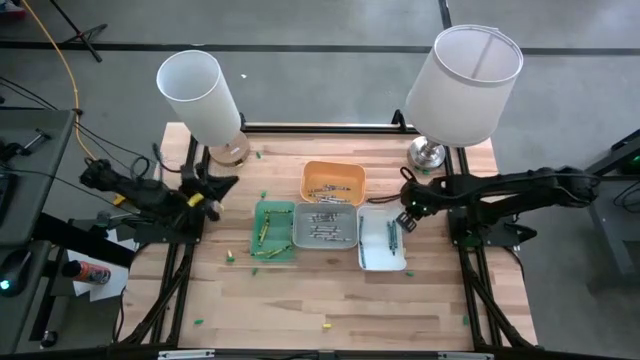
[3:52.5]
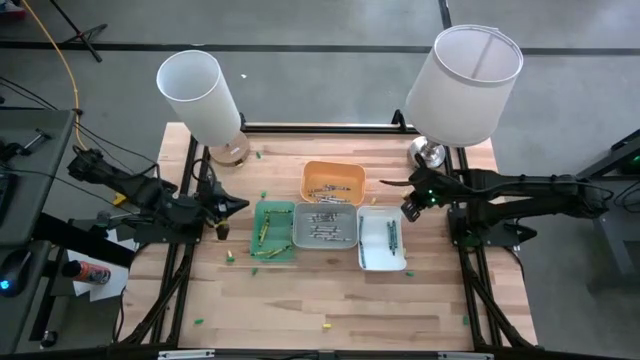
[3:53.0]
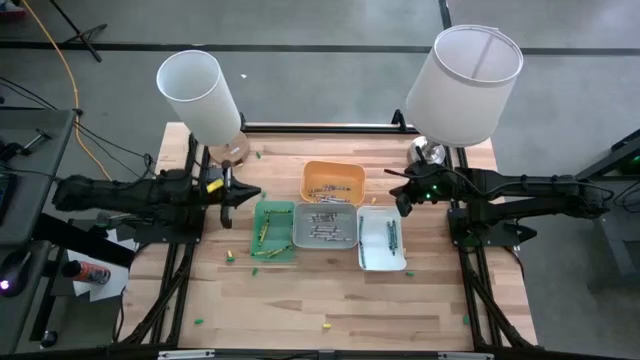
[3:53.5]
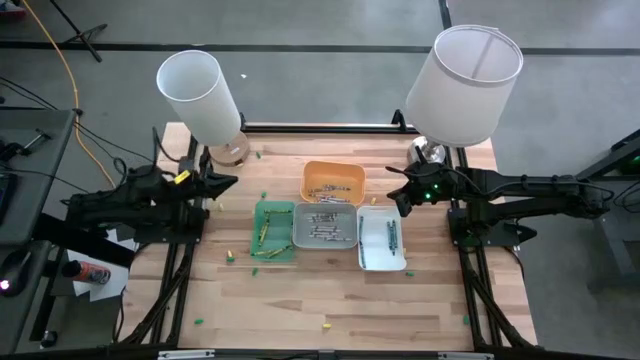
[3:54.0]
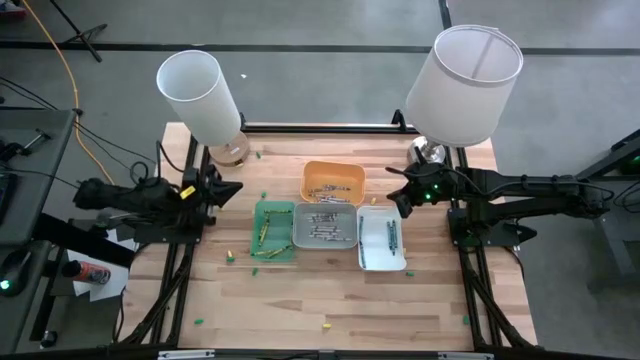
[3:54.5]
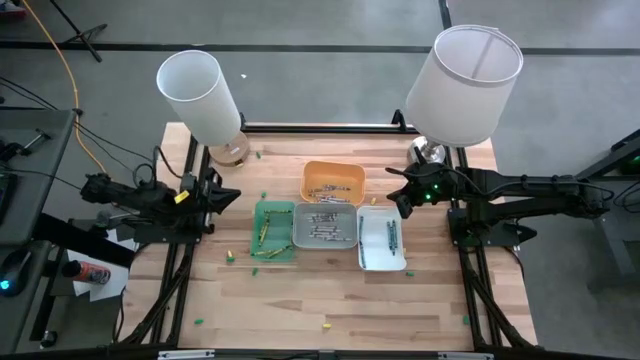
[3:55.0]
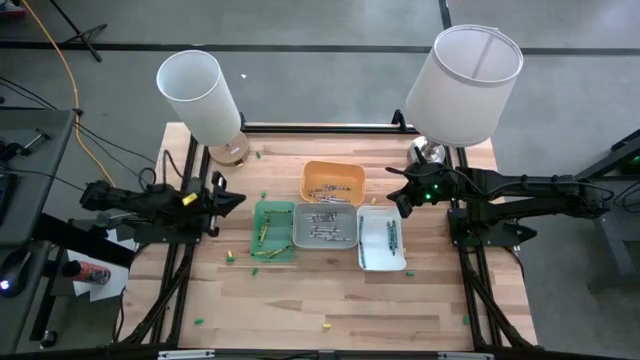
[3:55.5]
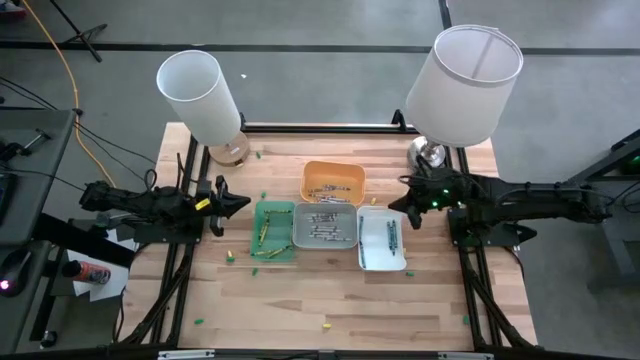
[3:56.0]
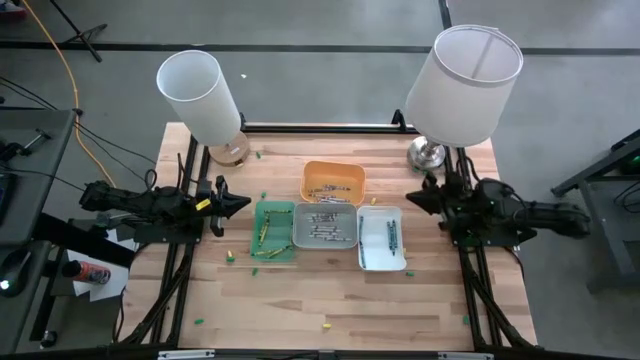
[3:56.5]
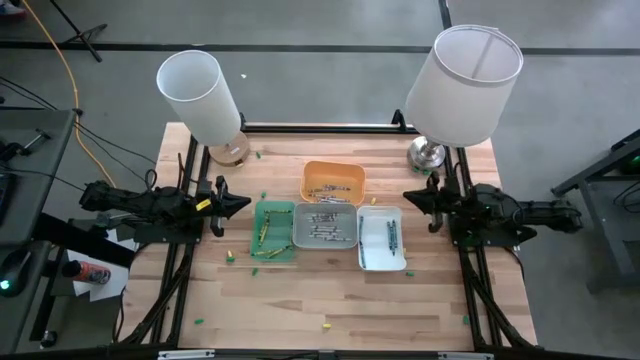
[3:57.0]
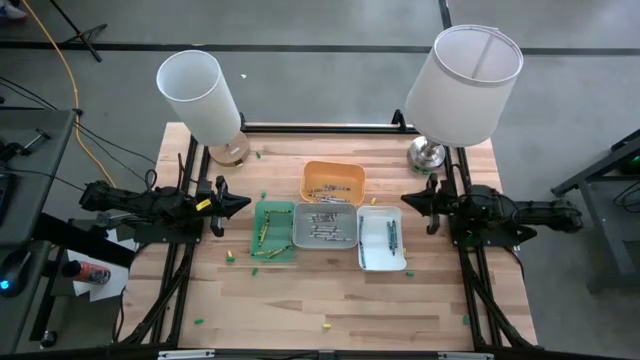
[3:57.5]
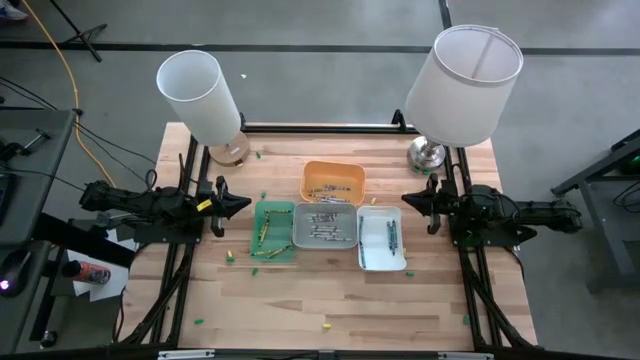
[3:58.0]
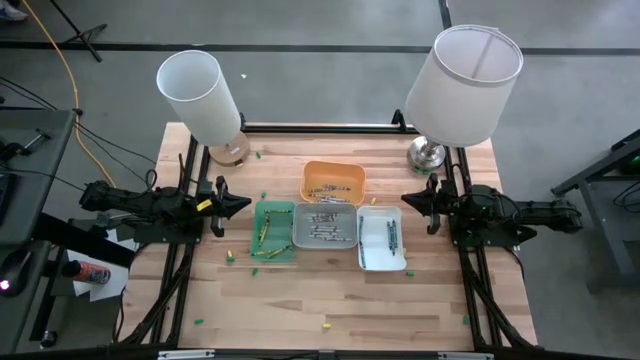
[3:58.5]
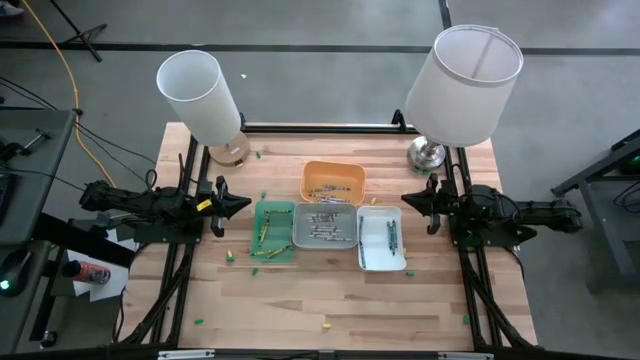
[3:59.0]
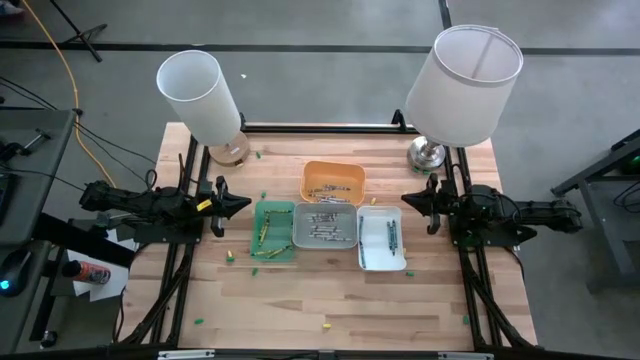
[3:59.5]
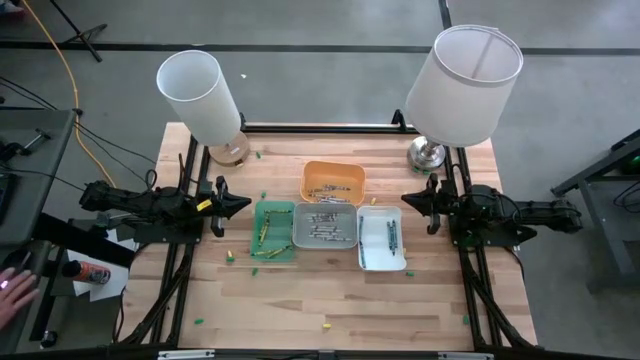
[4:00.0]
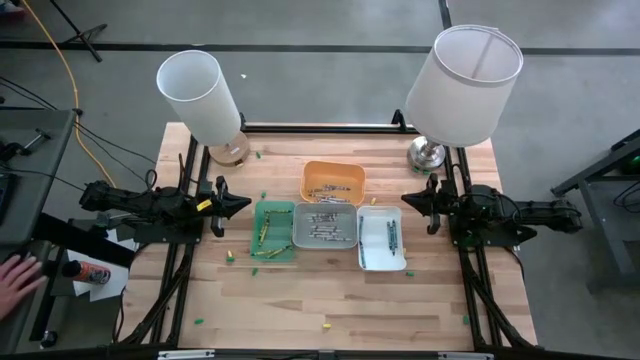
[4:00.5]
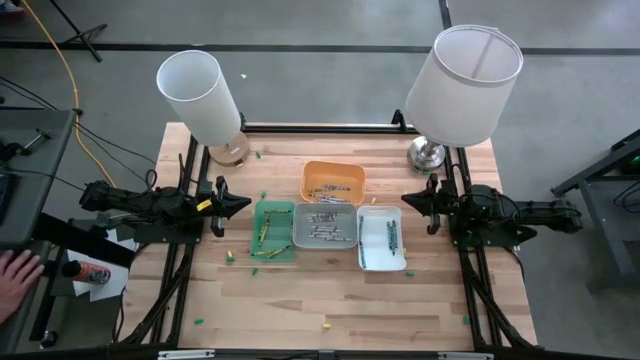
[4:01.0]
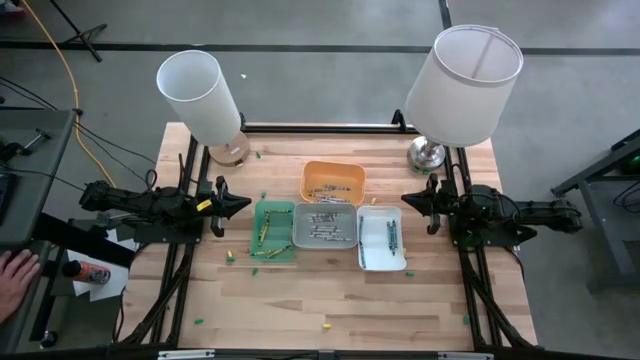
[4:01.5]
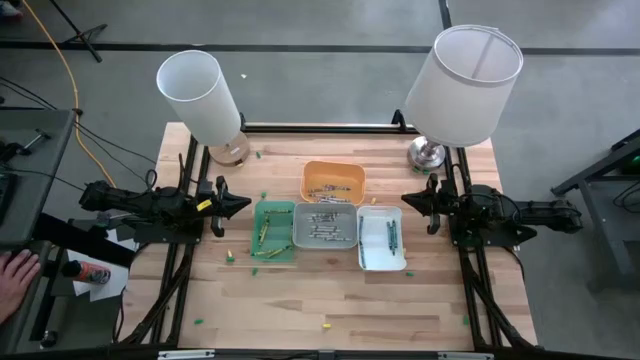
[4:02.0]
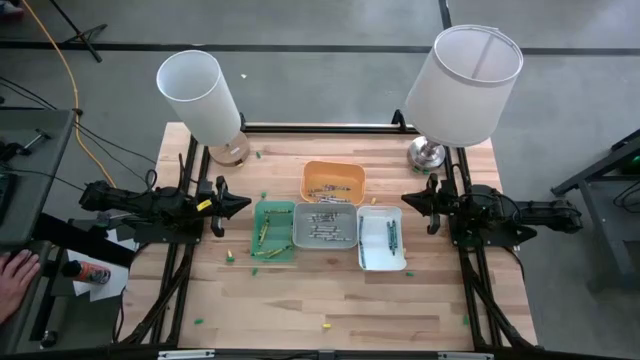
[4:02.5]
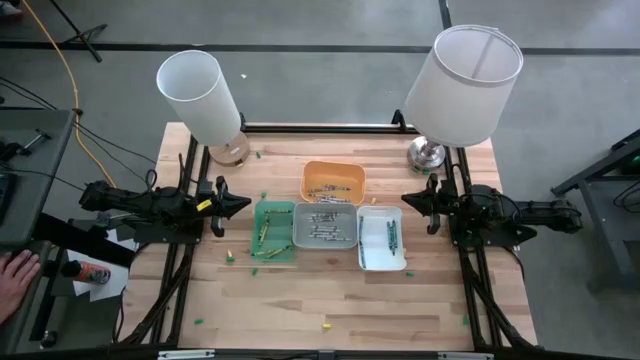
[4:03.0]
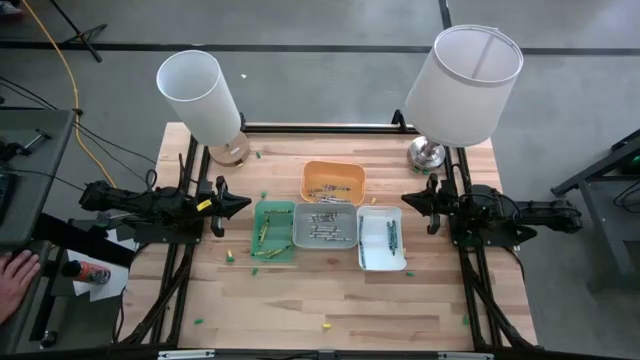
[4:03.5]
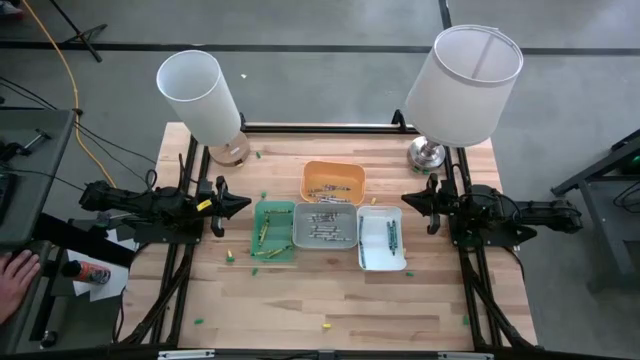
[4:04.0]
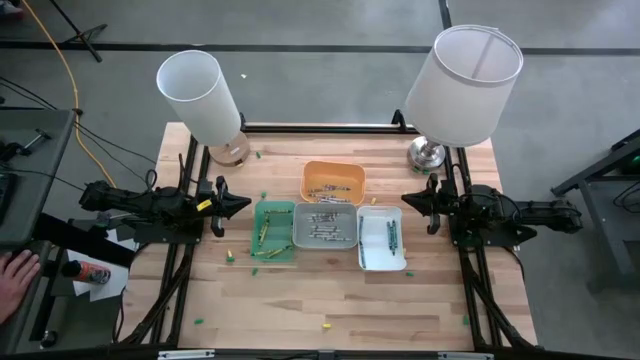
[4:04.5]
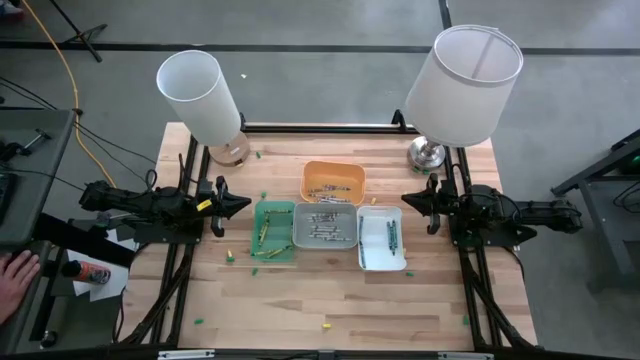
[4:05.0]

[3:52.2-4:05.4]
Task: Sort crayons
Return to Home Position

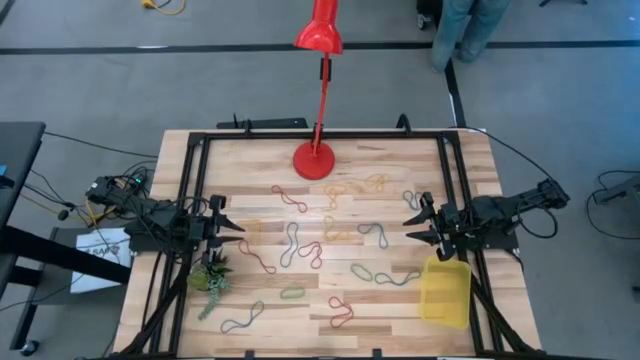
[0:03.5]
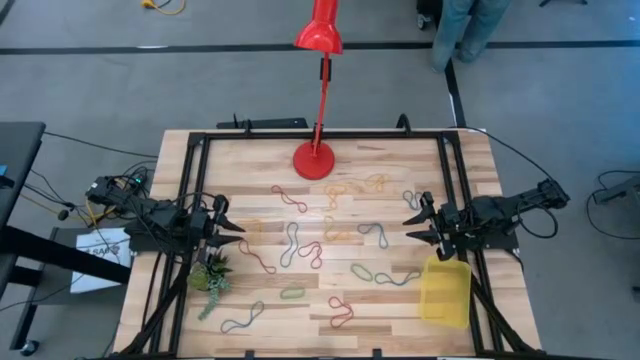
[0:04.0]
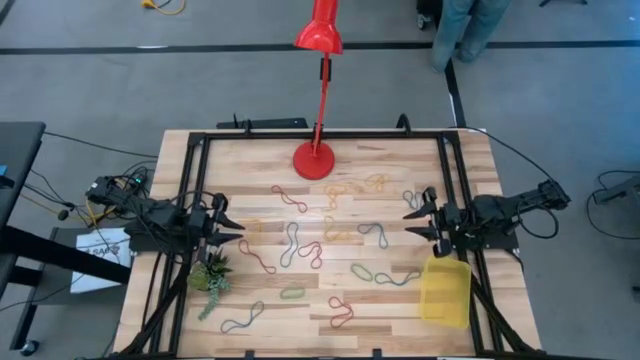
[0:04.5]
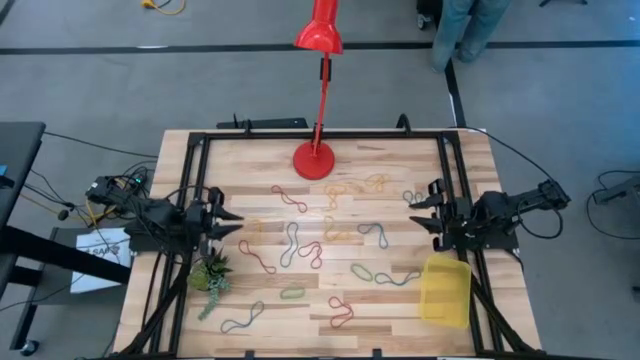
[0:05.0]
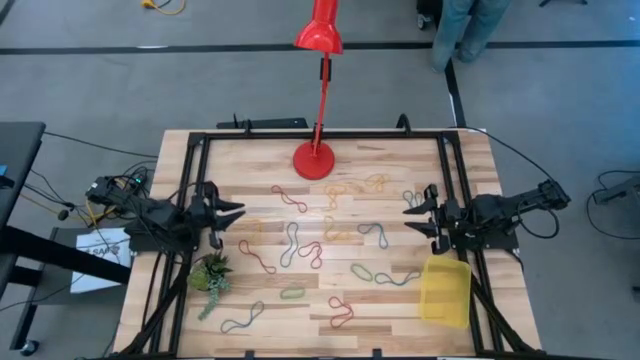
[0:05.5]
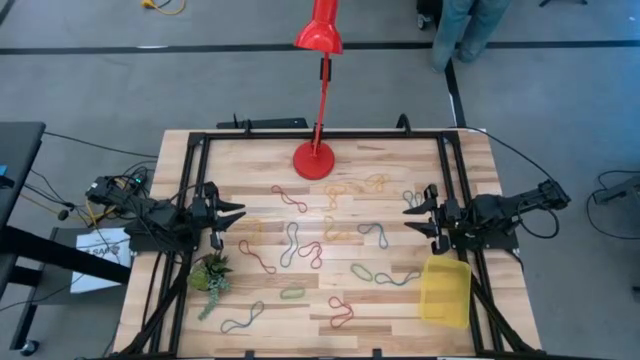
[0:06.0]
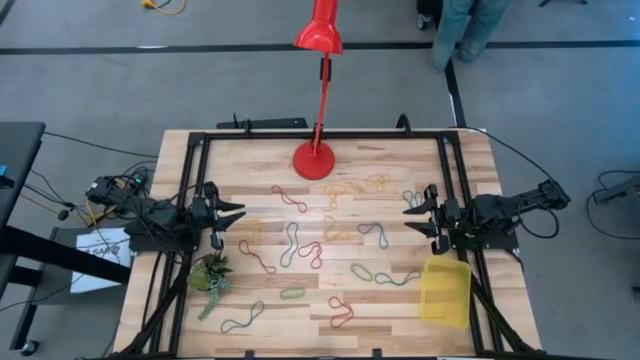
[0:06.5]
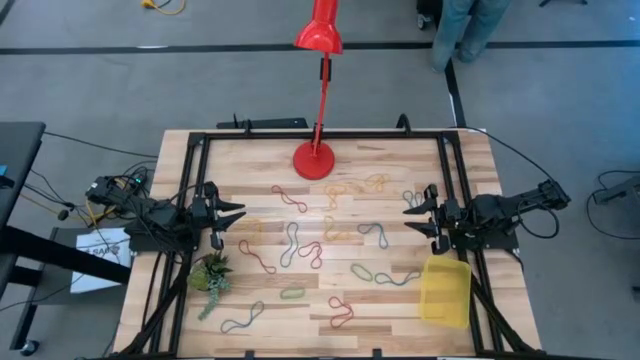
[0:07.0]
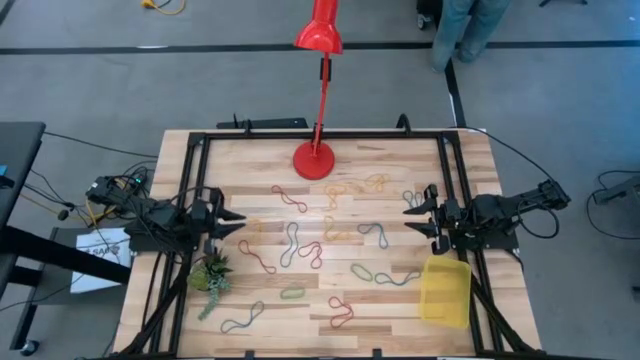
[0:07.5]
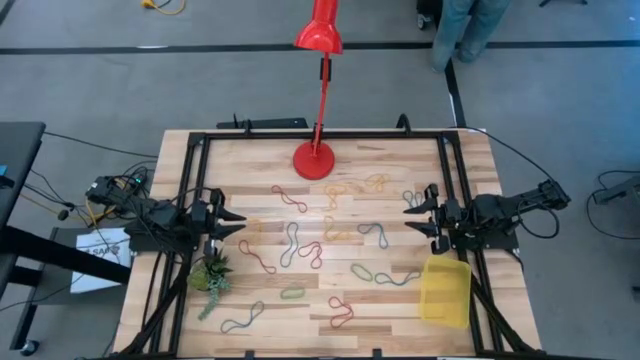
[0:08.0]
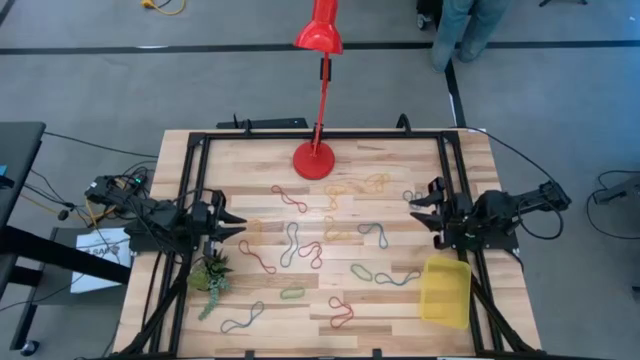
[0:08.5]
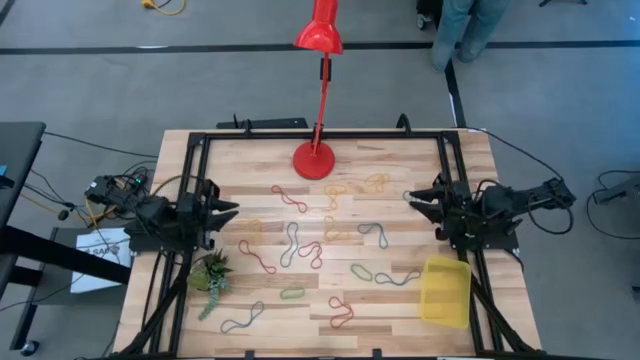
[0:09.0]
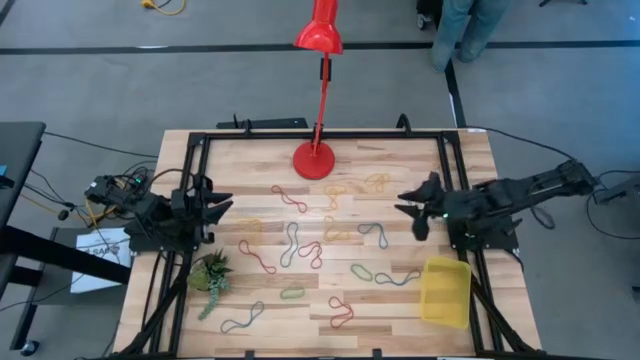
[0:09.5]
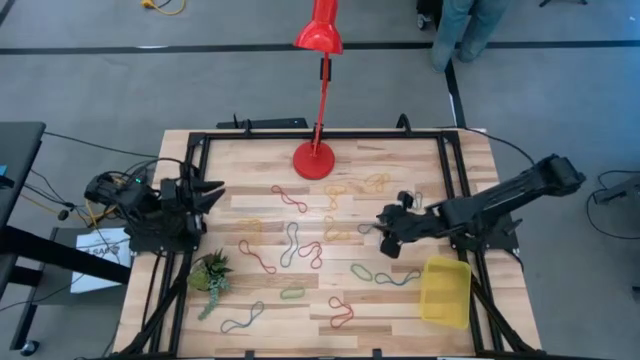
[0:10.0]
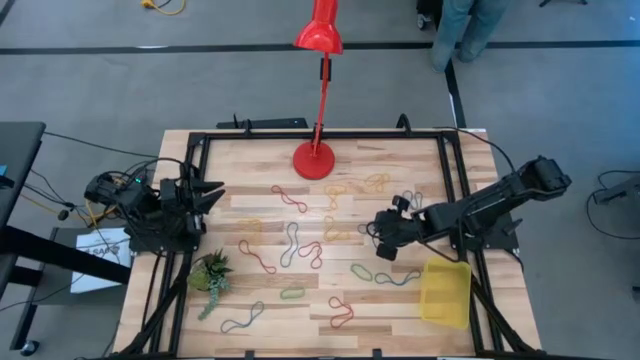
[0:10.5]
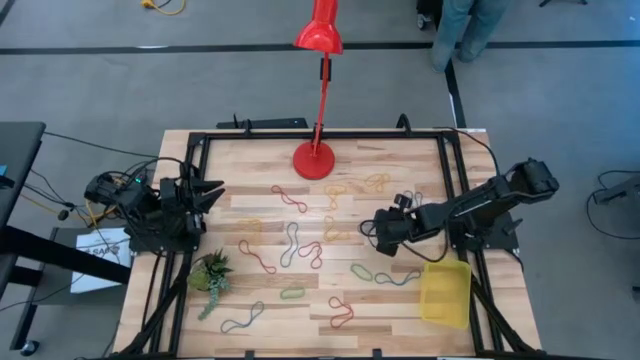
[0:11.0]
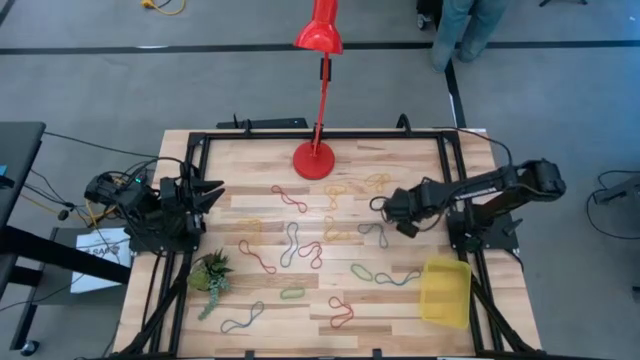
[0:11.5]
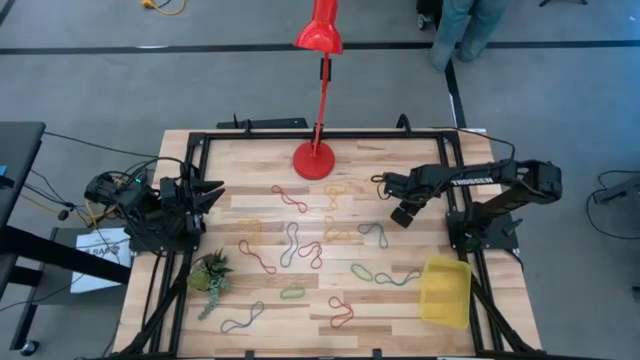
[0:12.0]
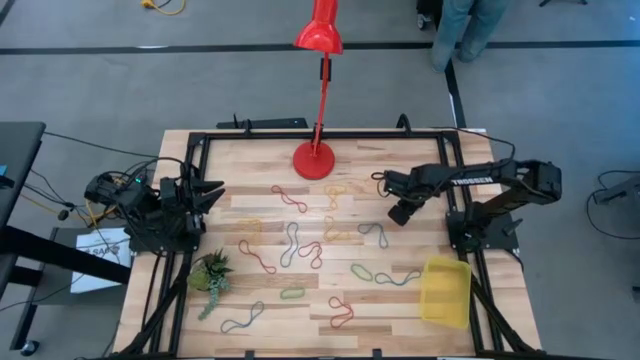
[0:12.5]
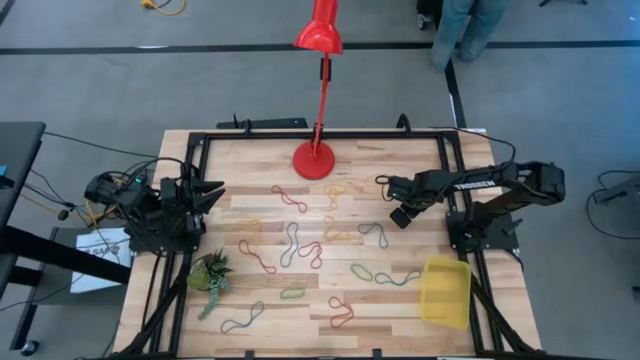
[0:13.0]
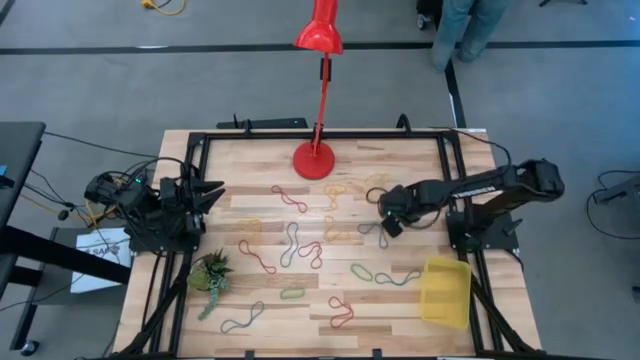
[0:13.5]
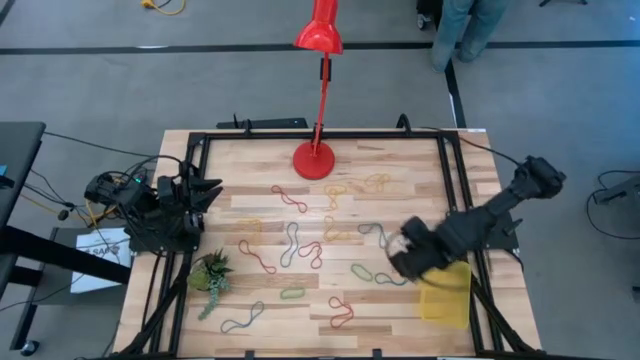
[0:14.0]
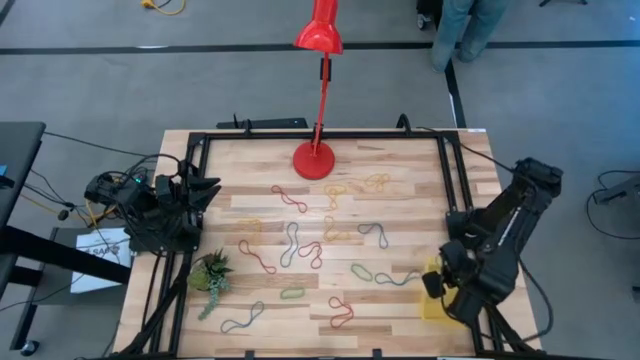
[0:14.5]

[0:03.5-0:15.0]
Task: Pick and place rubber bands into bin
Put the blue rubber band into the container
